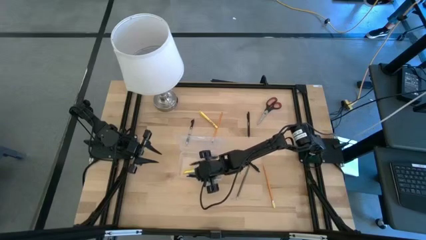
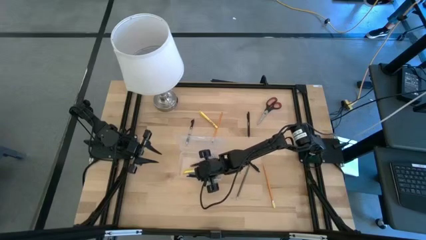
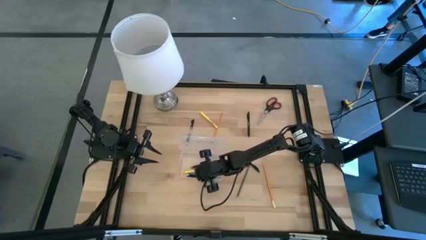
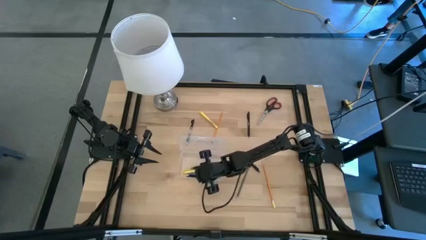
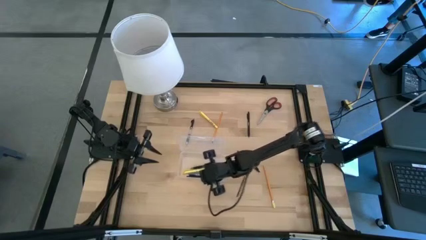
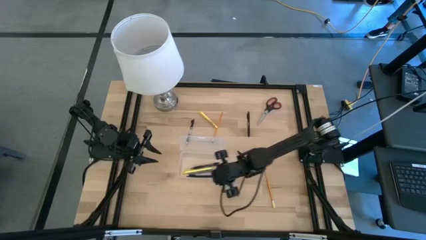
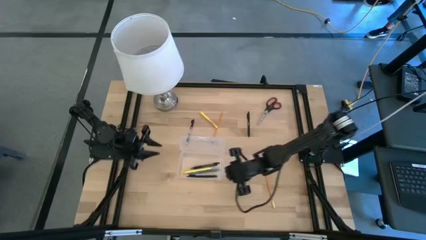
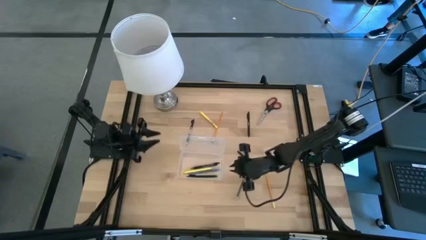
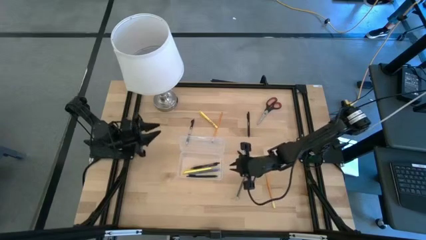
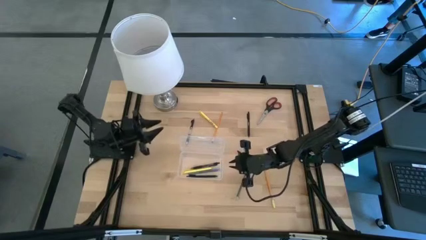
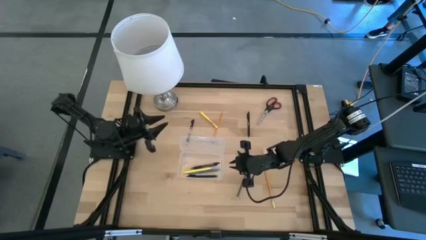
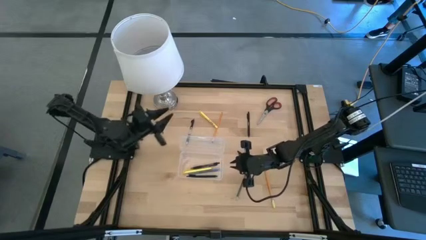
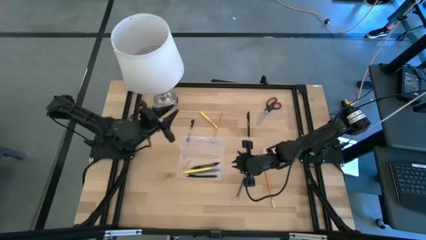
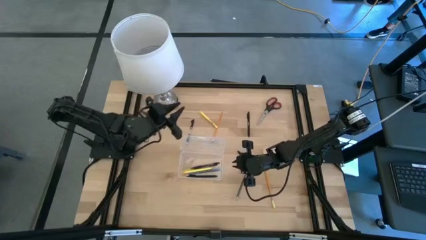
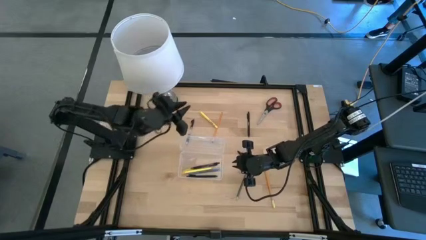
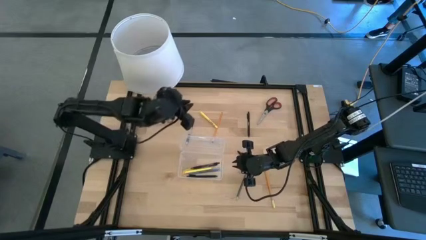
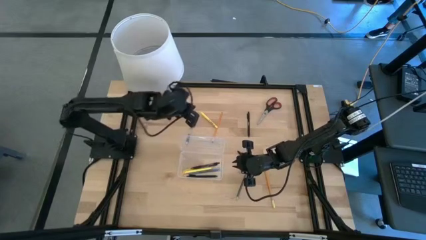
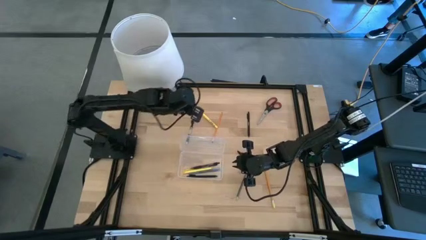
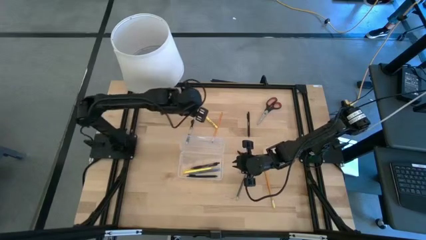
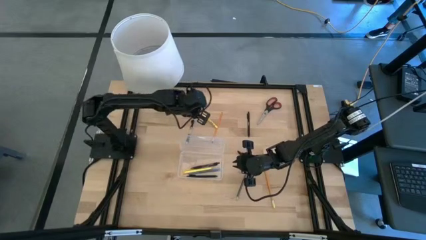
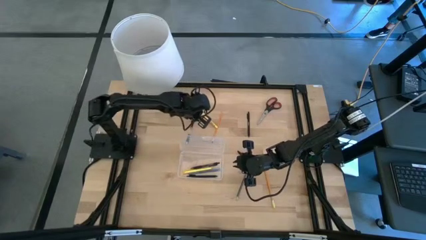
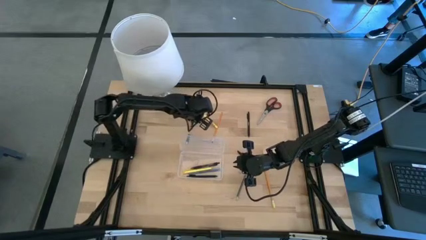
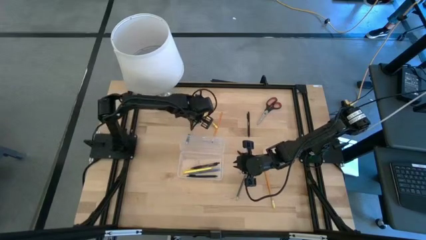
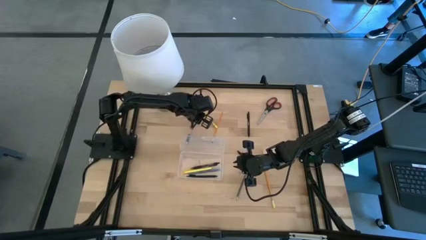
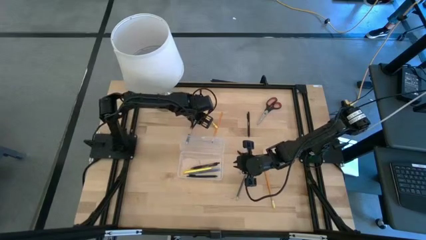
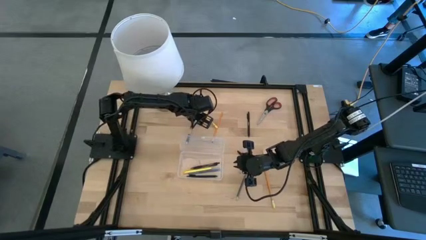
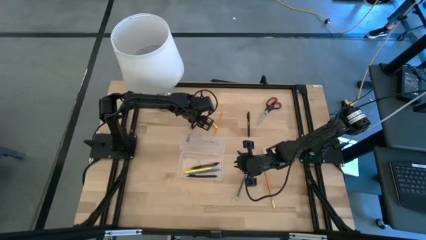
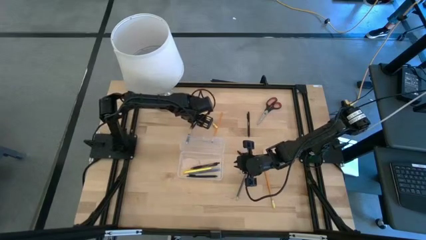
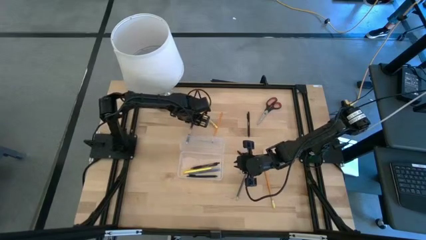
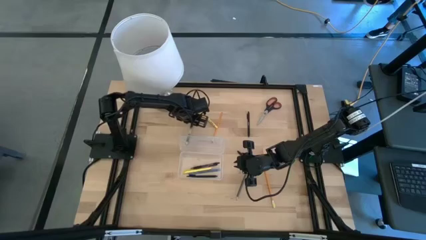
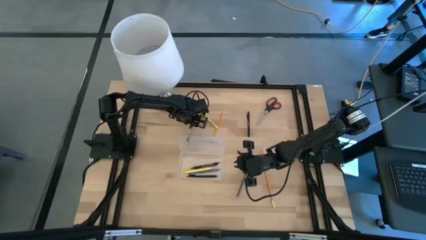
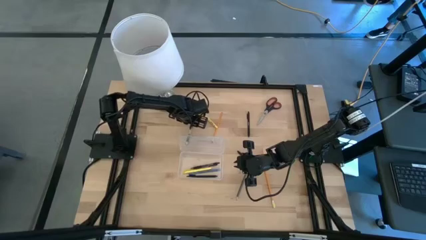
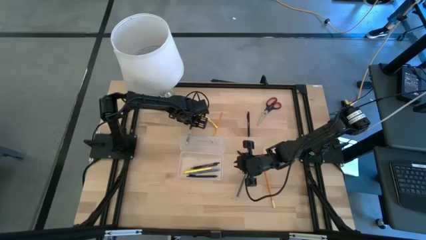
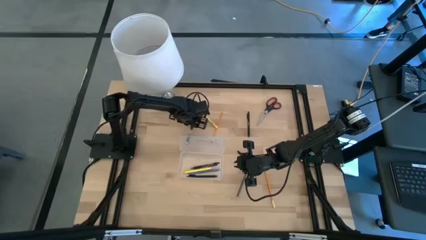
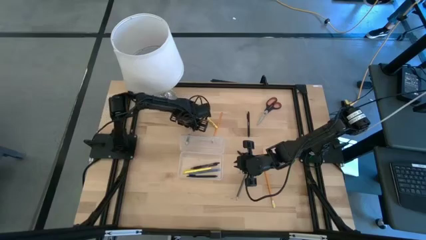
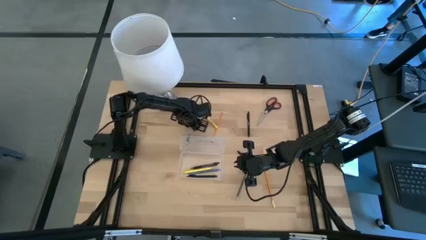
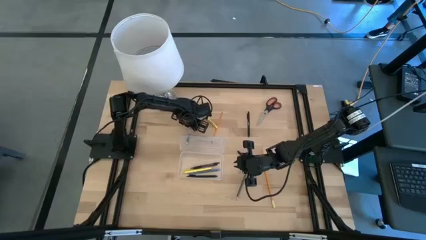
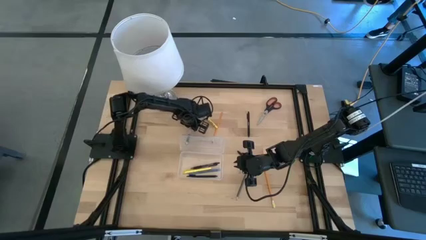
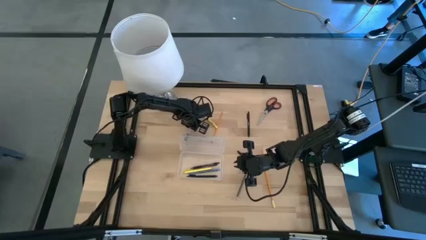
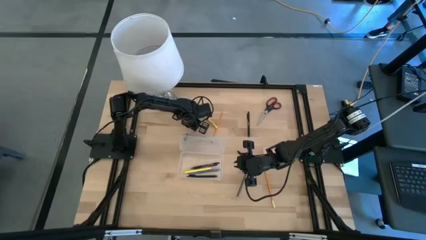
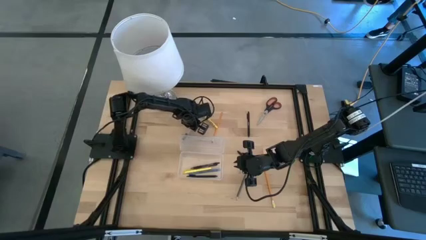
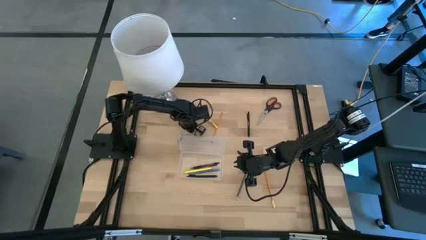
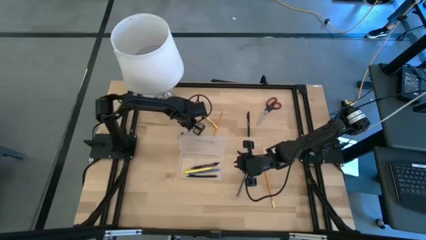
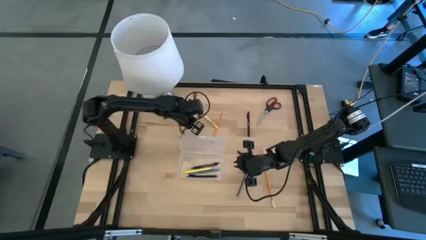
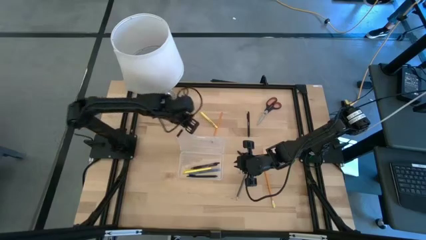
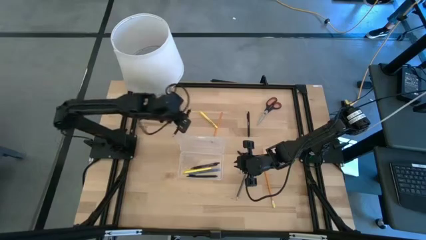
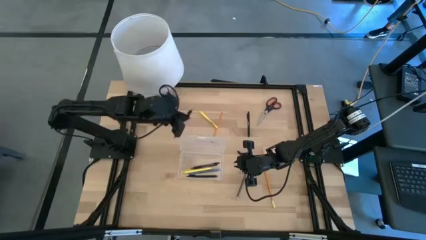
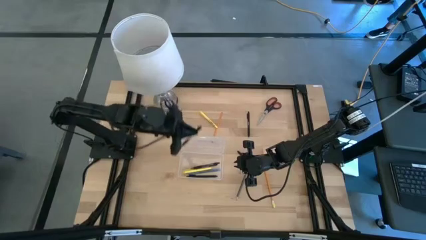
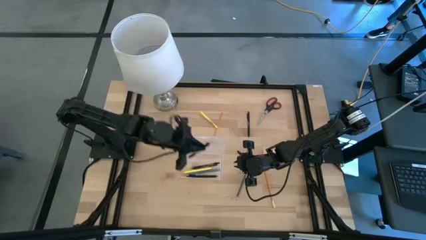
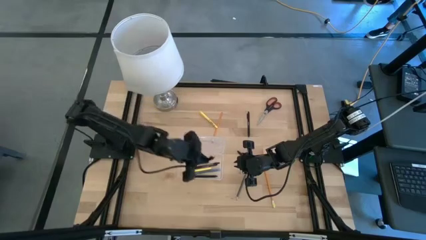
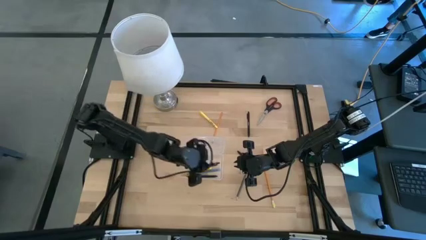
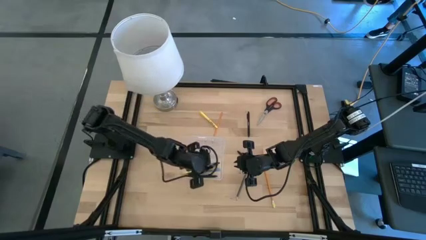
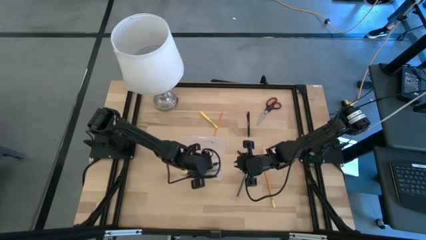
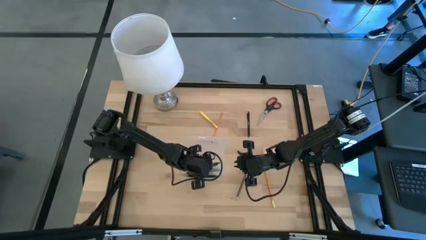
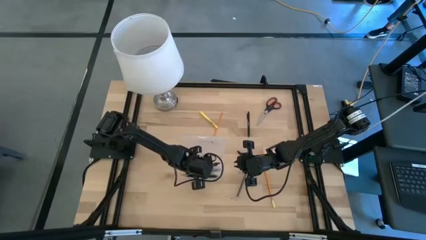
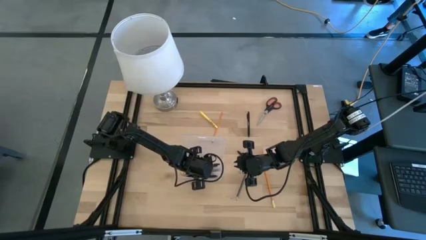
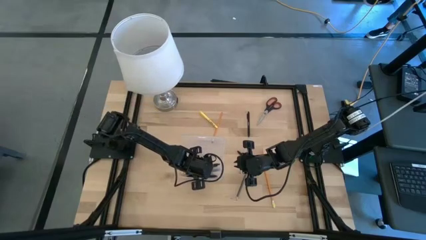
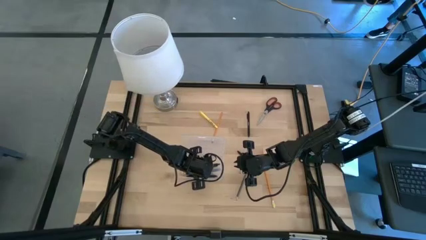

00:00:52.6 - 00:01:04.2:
Task: Pick & place school supplies into a supply box
Put the transparent pen into the transparent supply box

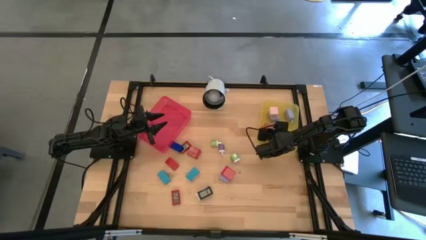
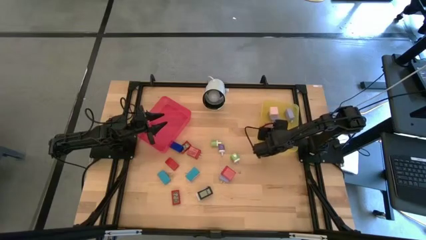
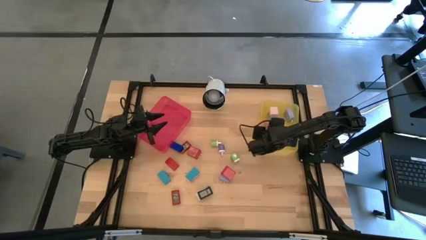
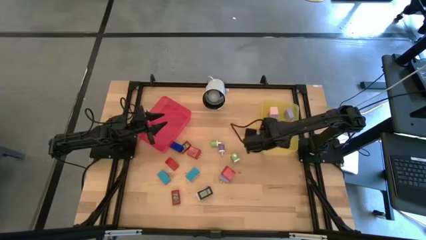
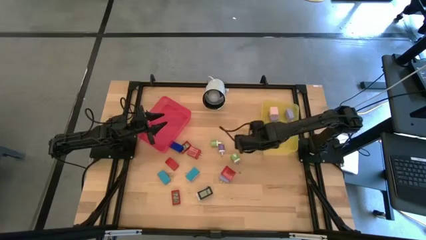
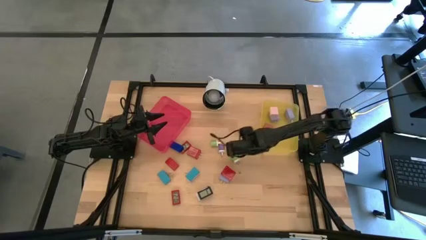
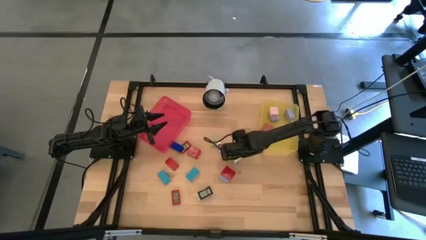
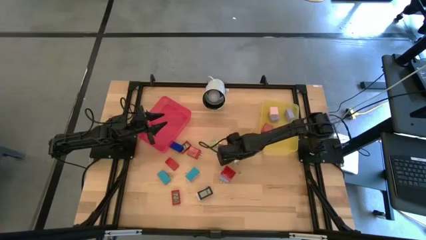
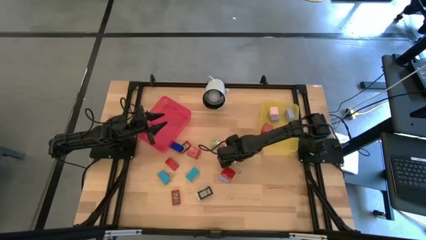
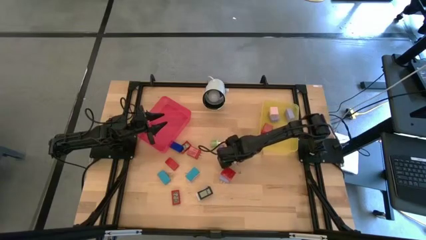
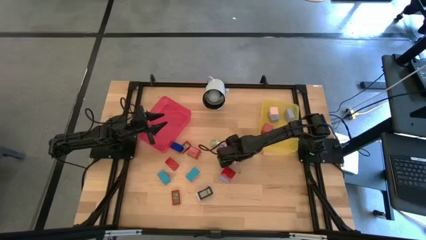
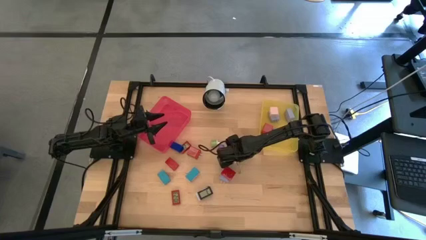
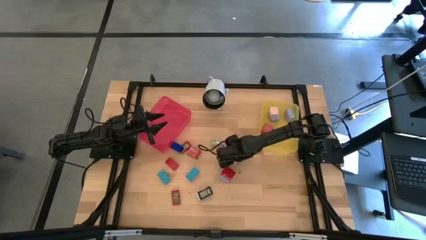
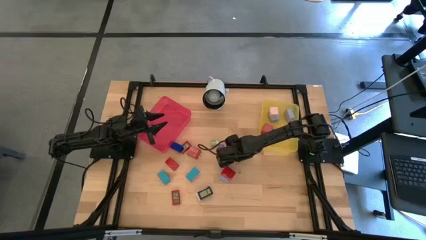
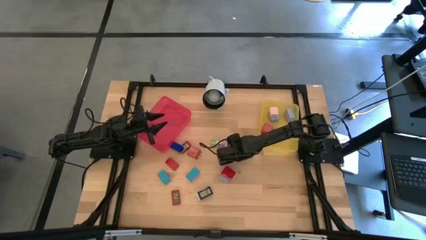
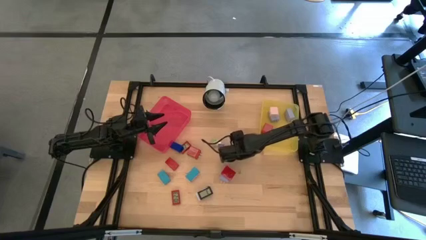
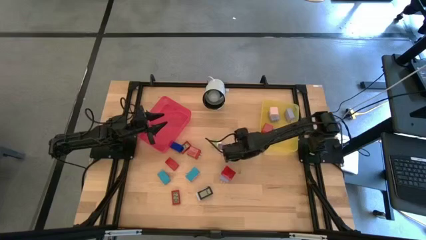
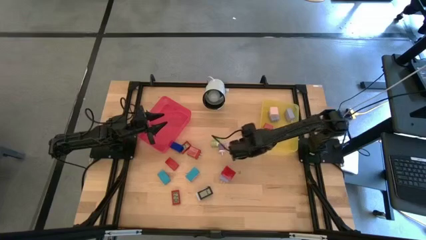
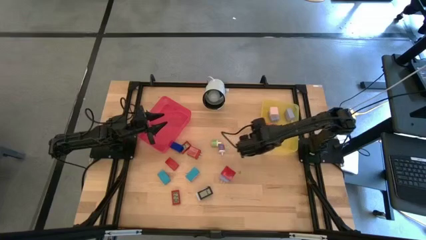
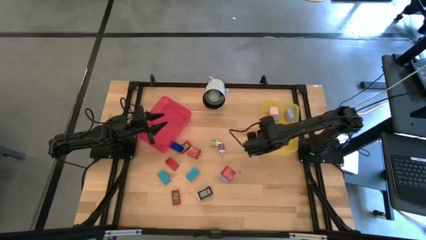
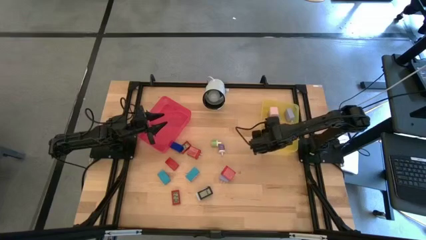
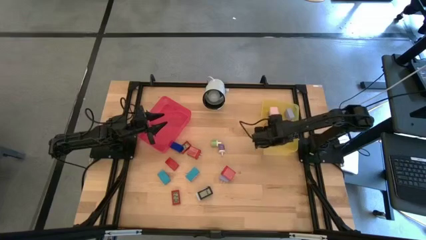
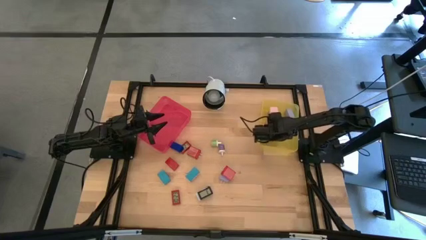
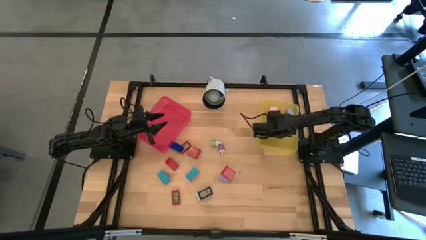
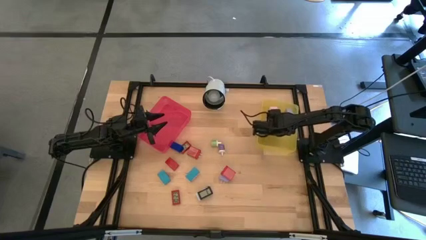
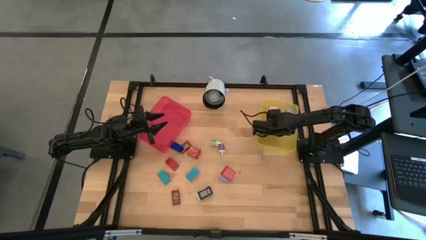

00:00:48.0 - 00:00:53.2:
Task: Pick & Place Office items
Put the right green charger adapter into the yellow bin

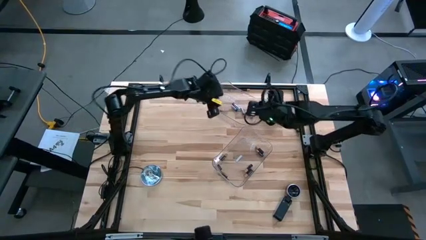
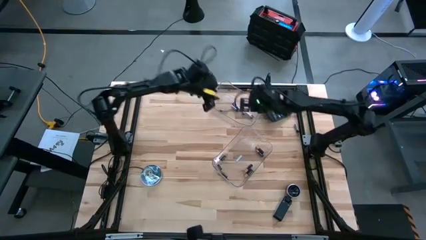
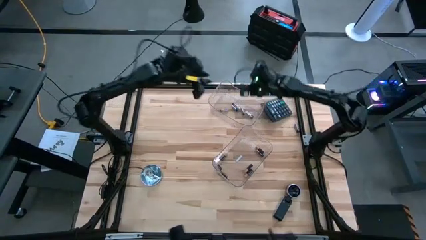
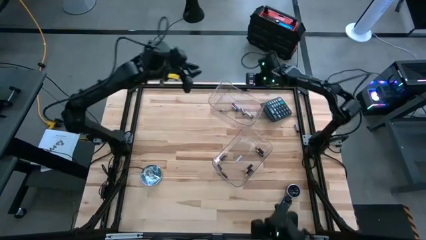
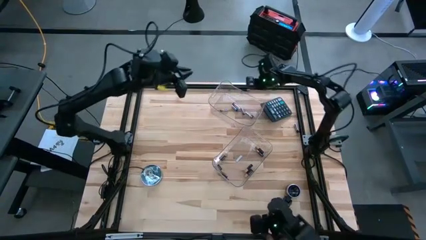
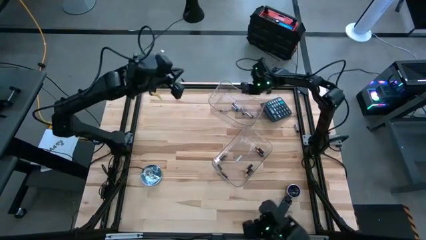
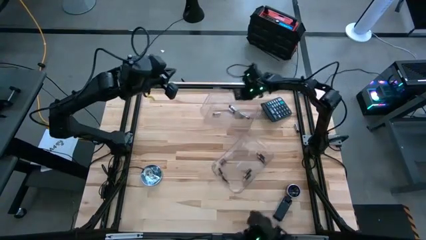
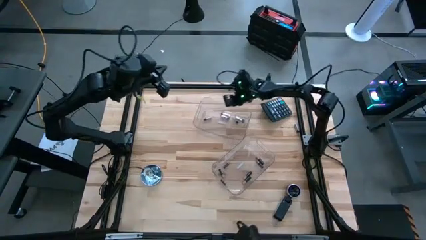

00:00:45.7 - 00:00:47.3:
Task: Sort batteries
Adjust the top transparent bin
